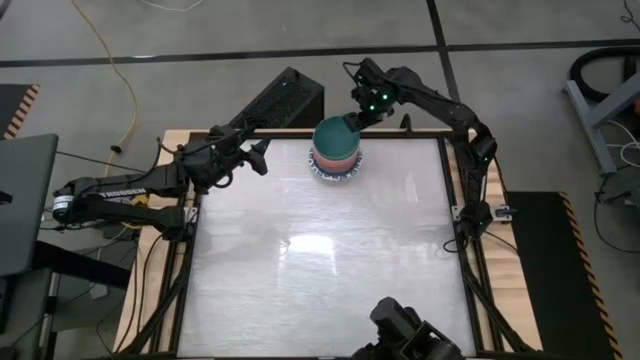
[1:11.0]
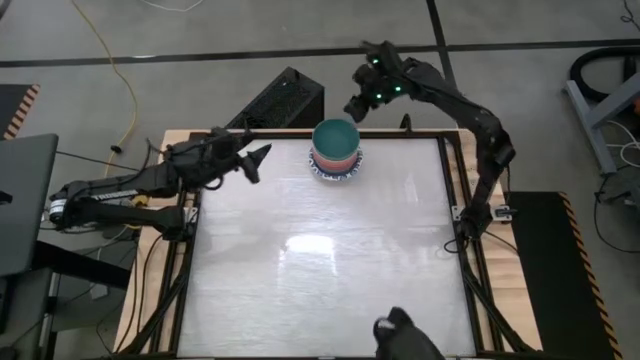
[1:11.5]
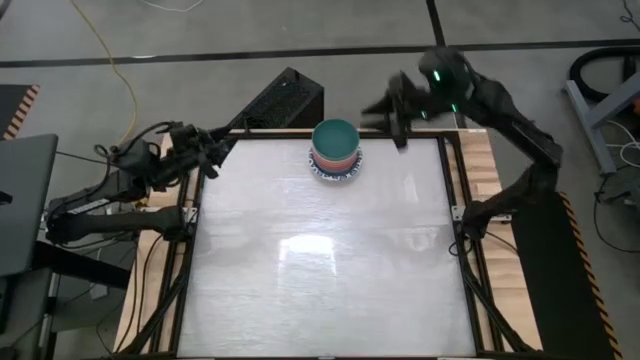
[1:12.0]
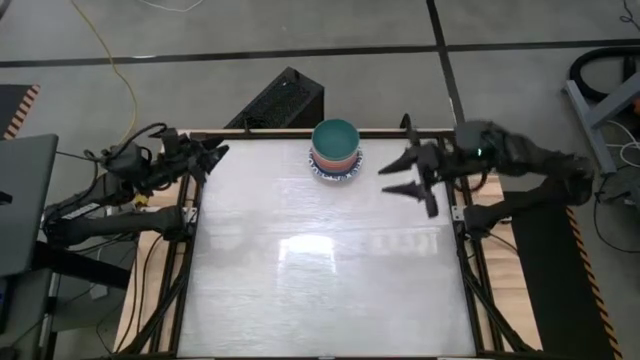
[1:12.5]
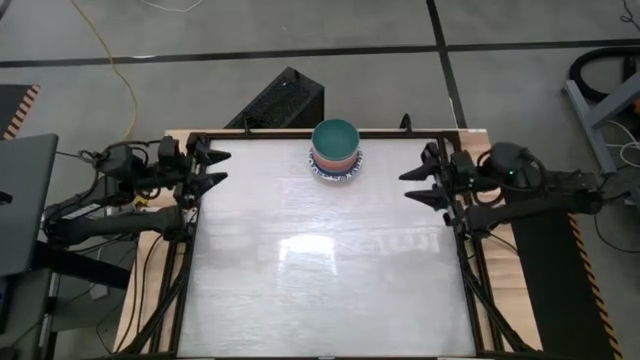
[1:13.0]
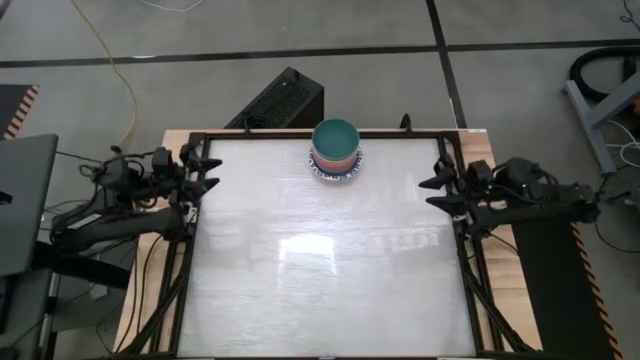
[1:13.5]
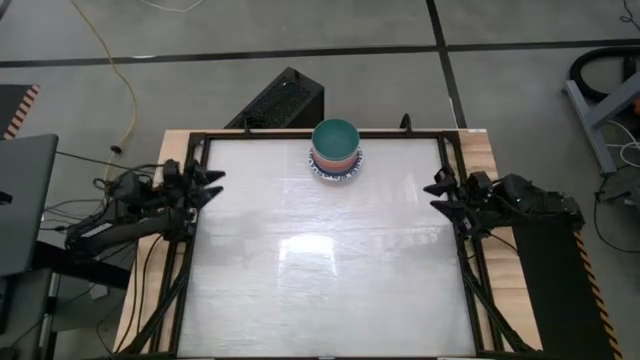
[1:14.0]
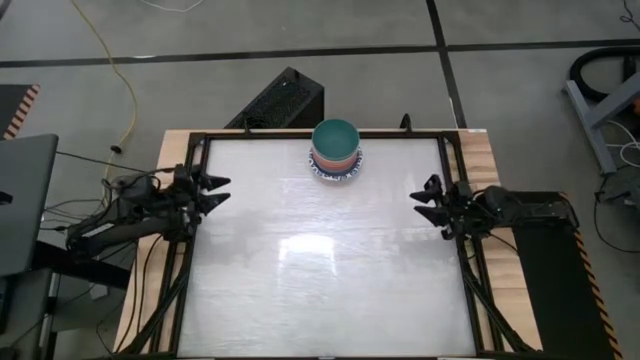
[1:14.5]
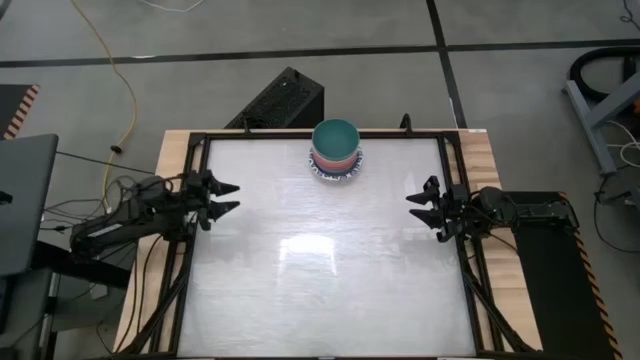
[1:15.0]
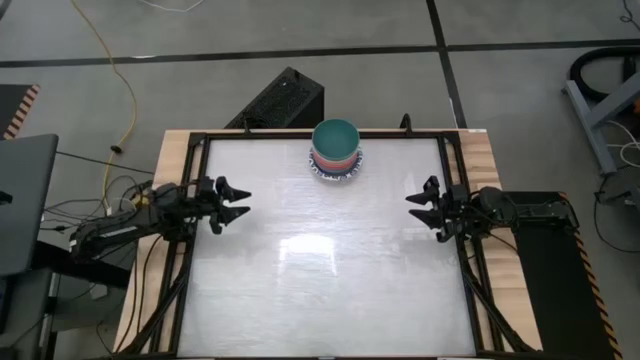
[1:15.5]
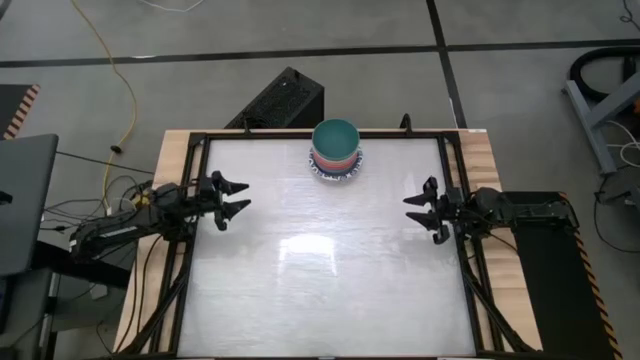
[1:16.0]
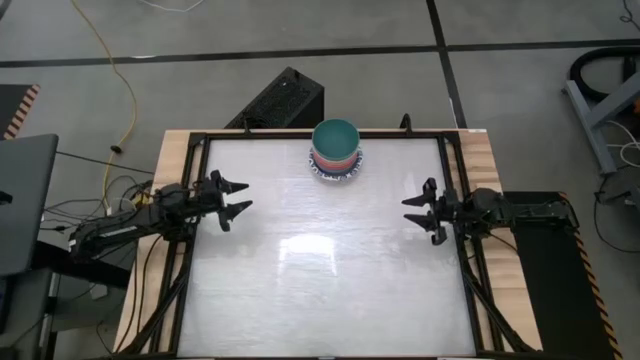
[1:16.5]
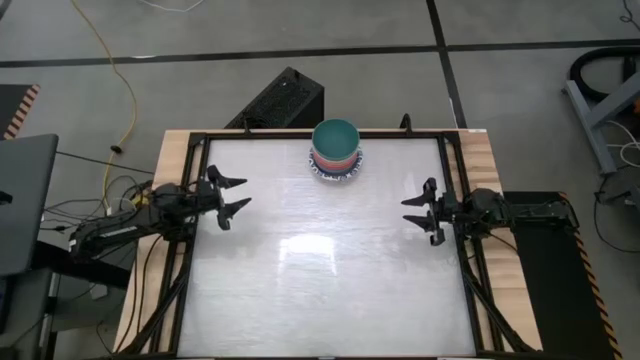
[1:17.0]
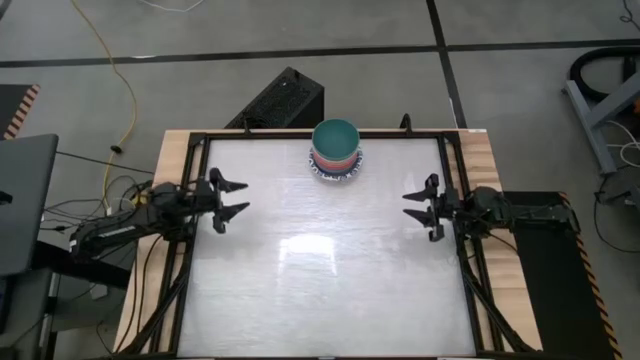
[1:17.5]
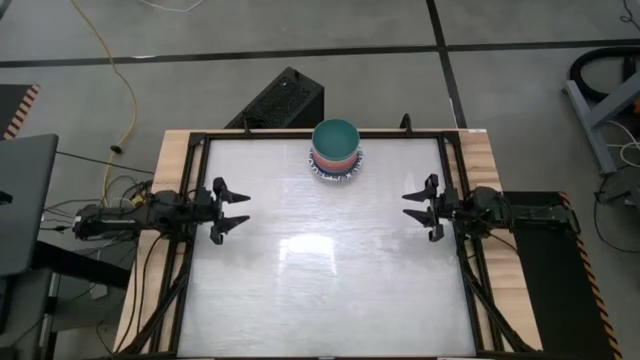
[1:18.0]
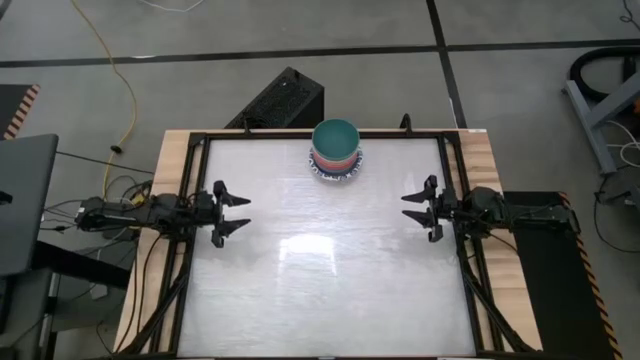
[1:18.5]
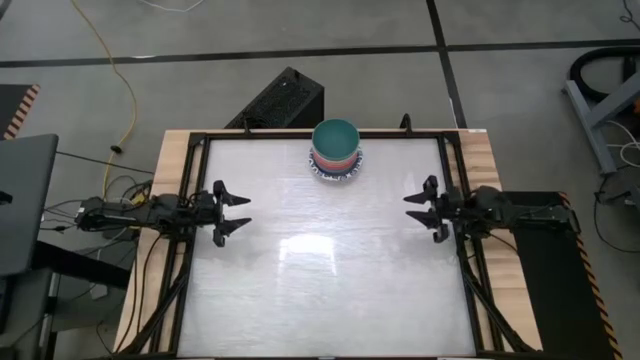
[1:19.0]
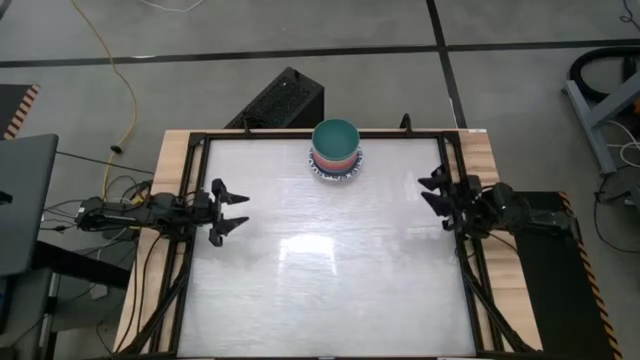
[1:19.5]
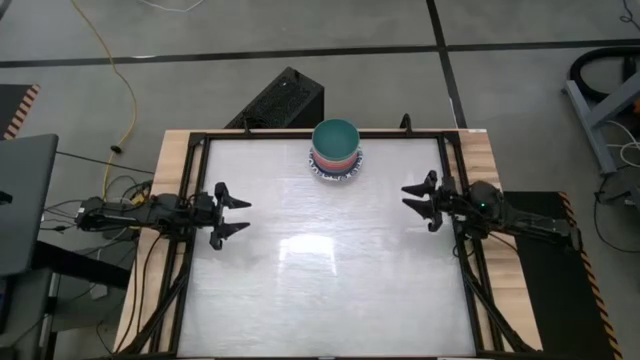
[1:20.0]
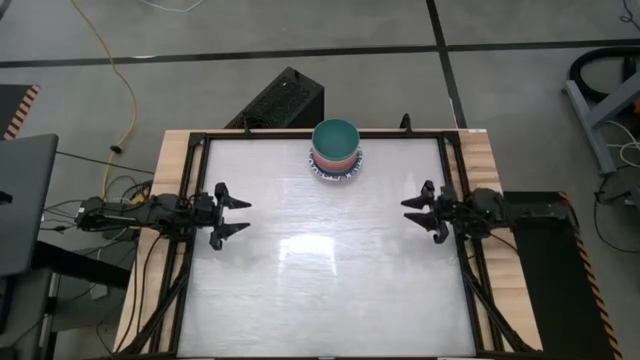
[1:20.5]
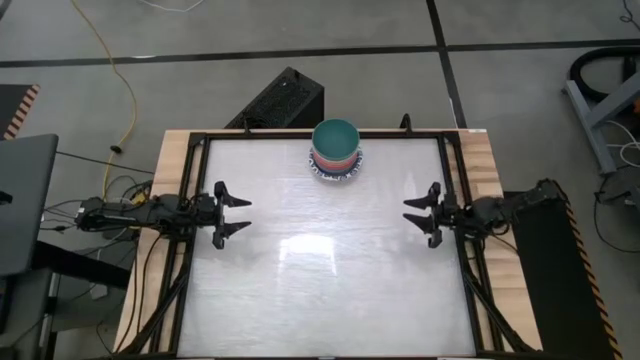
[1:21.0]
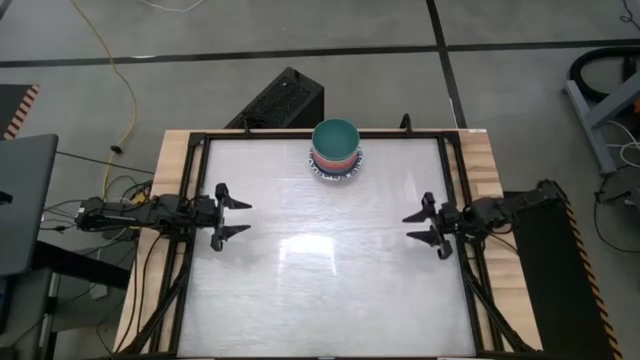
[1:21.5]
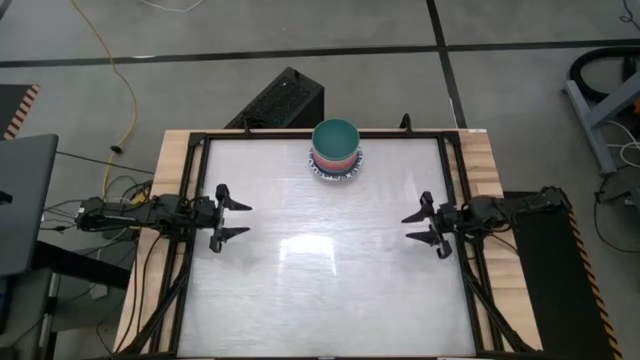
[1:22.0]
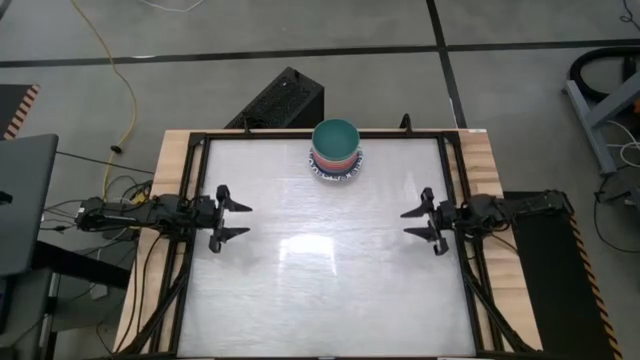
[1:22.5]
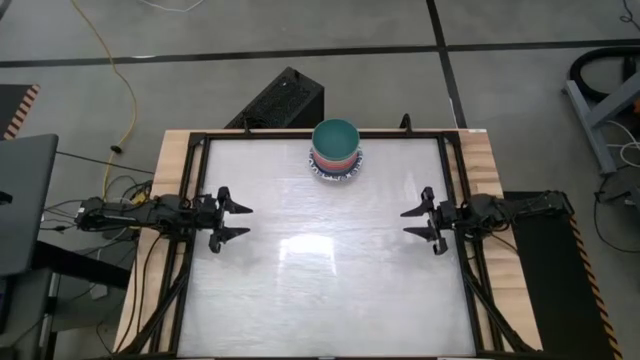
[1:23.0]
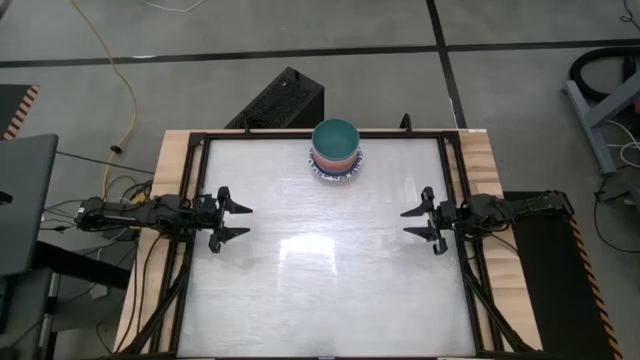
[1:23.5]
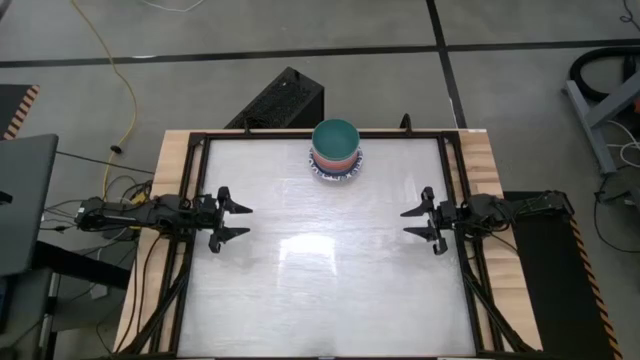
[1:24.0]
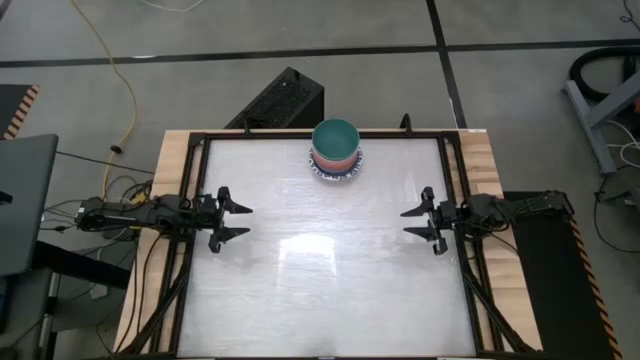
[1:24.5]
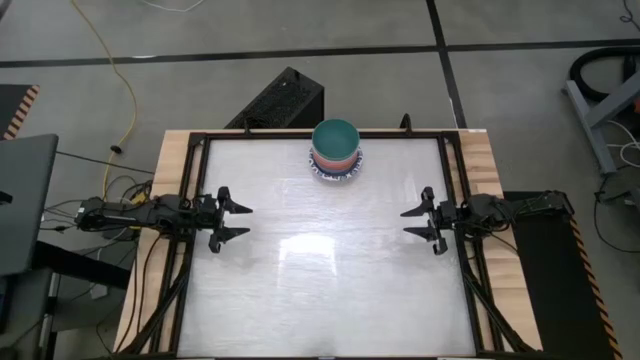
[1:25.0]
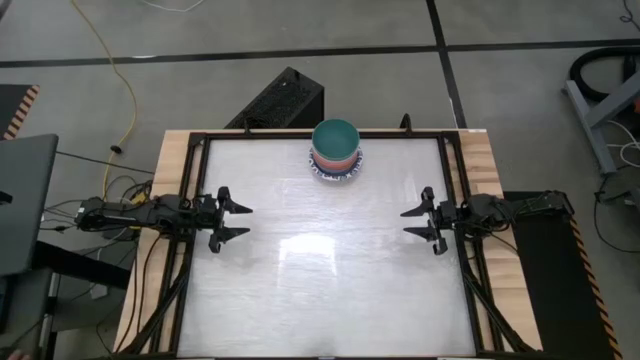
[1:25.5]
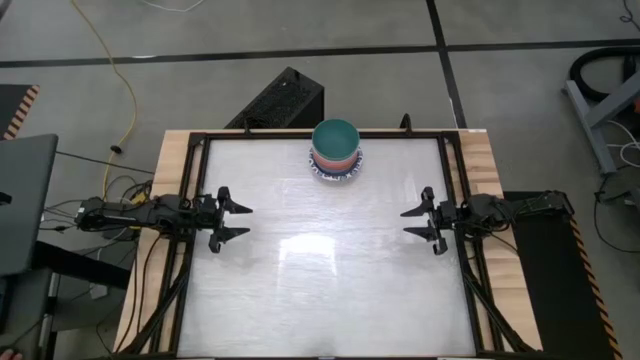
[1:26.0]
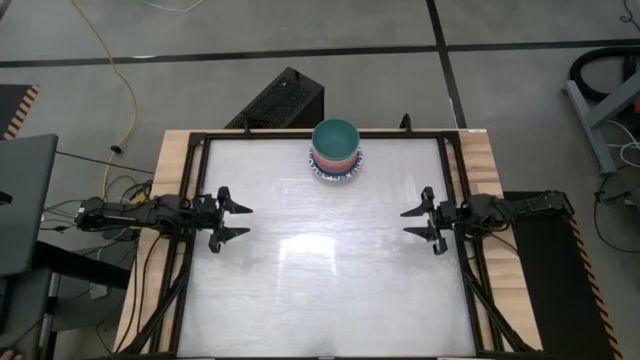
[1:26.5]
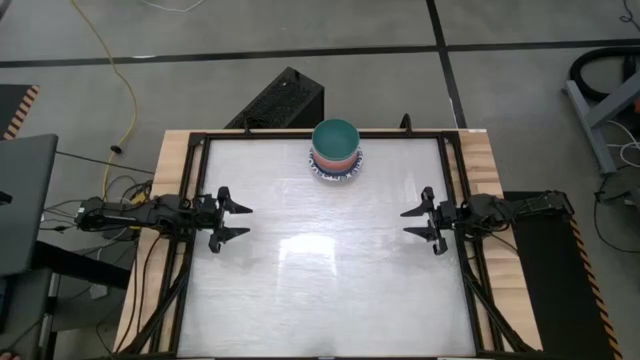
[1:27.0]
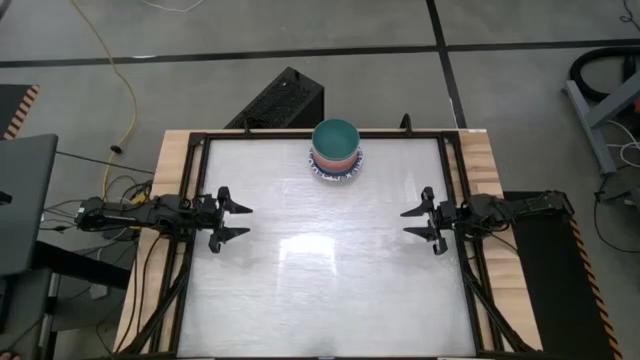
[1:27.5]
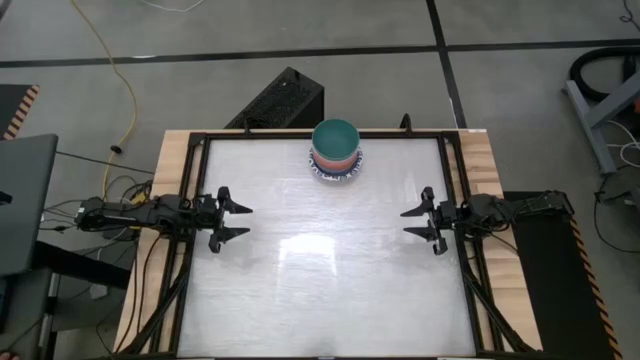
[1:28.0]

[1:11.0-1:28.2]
Return to Home Position

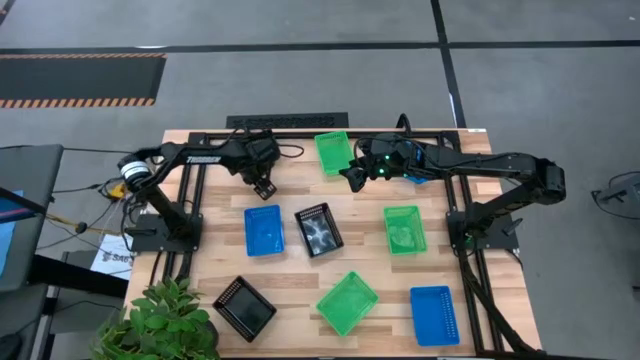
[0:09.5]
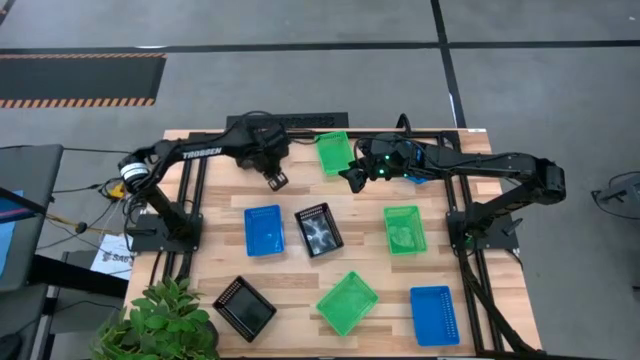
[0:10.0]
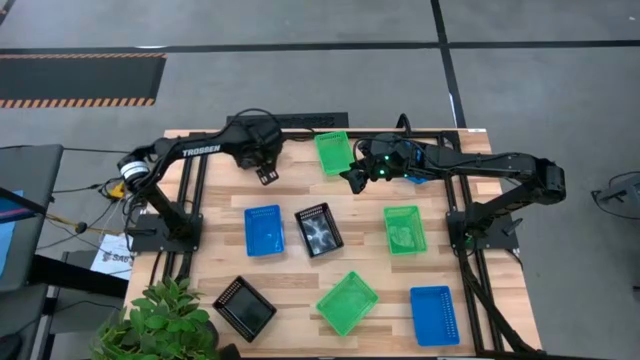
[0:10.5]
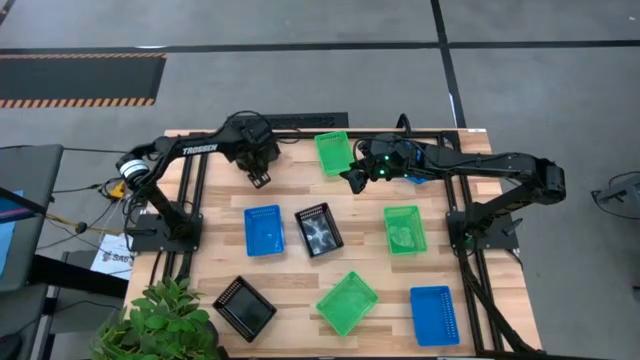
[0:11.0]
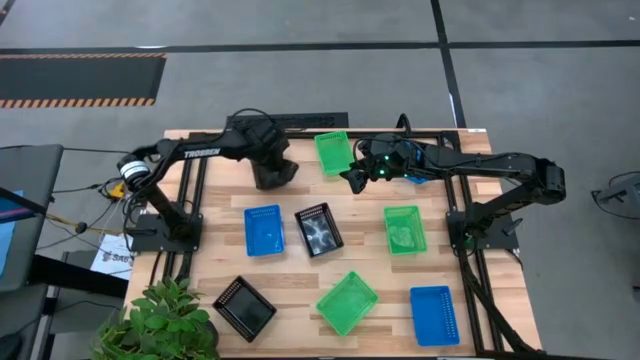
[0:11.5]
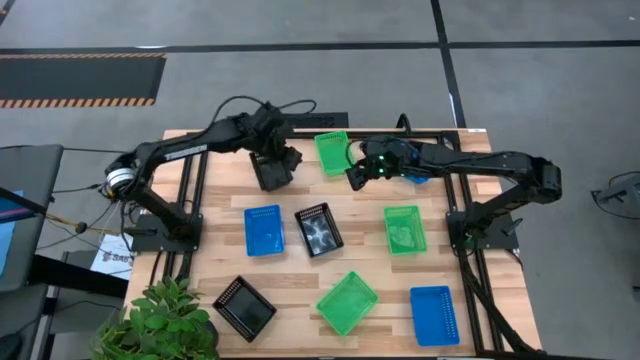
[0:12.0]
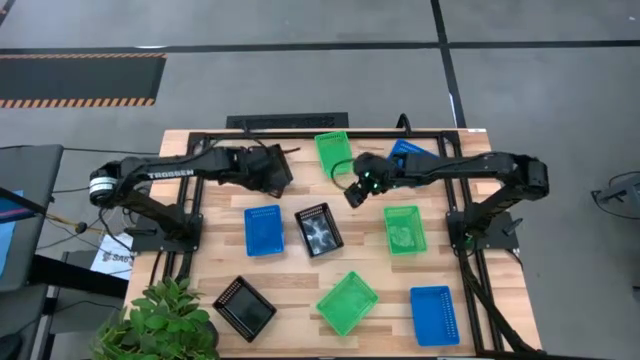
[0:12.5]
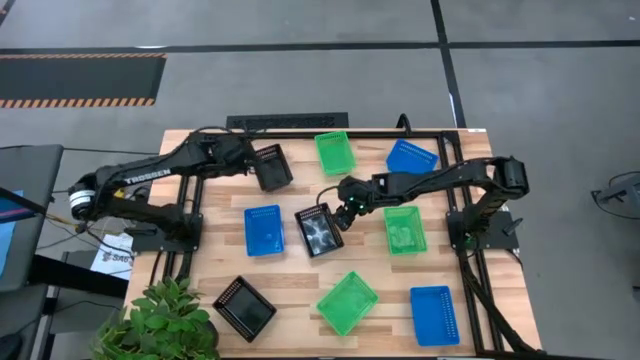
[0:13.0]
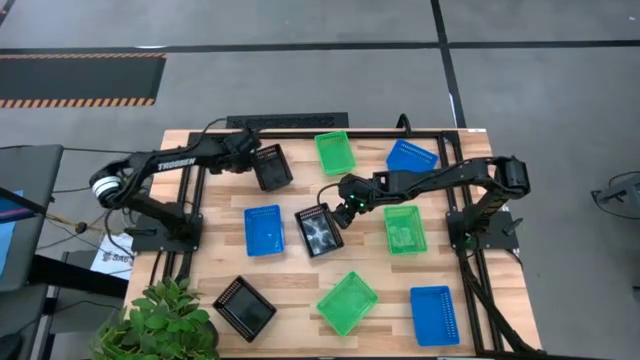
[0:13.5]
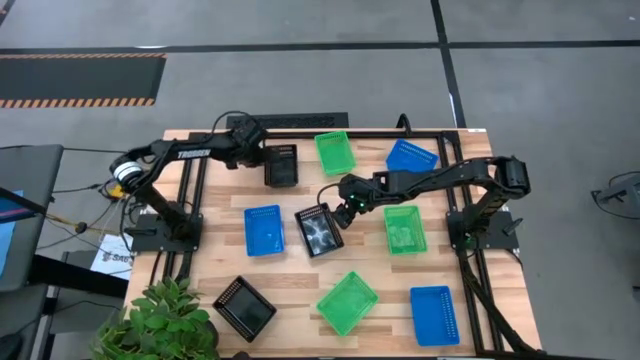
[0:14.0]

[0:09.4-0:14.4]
Adjust the top black bin
